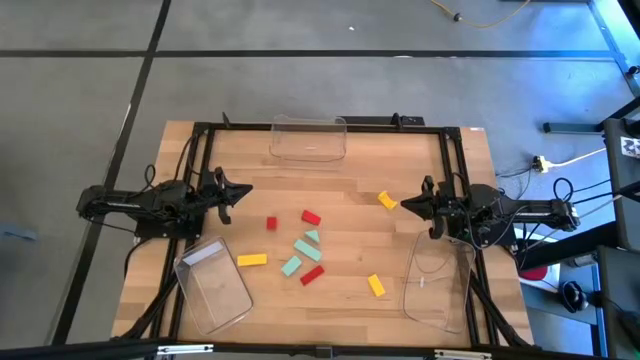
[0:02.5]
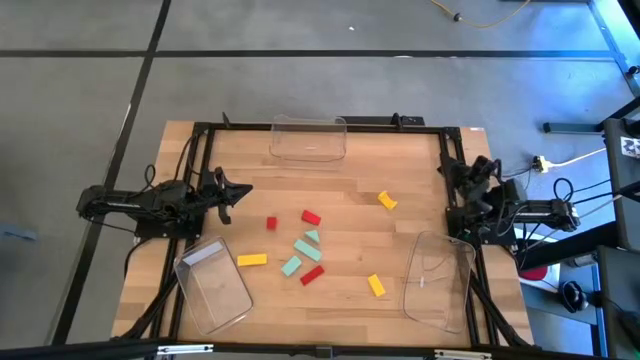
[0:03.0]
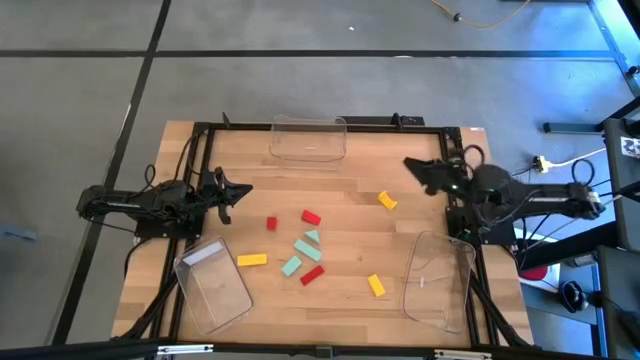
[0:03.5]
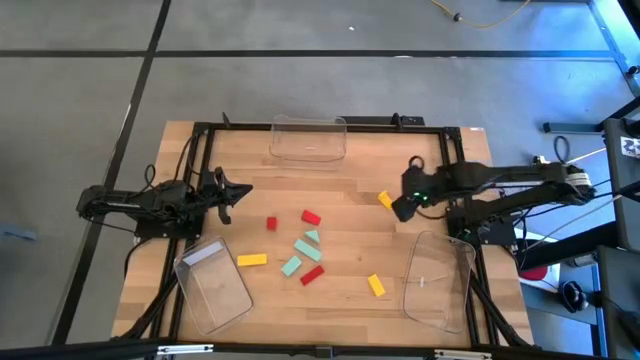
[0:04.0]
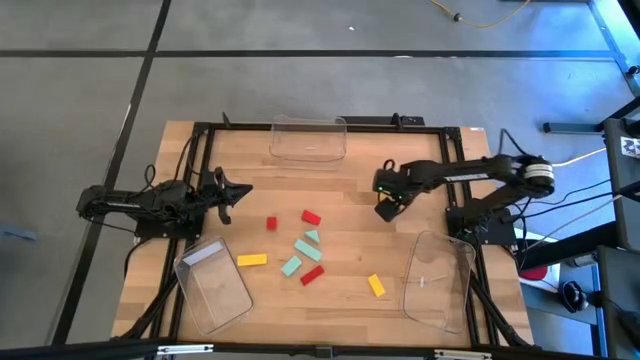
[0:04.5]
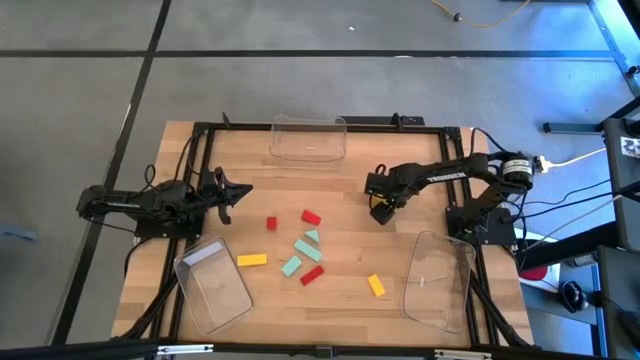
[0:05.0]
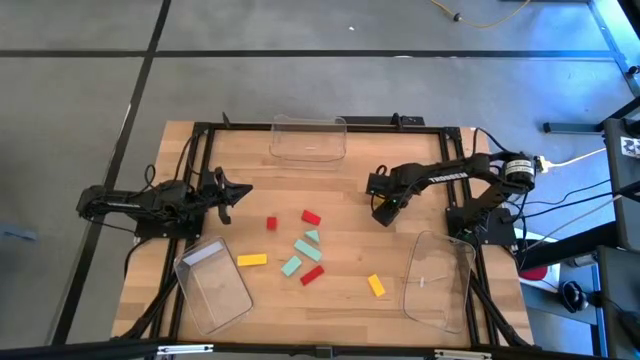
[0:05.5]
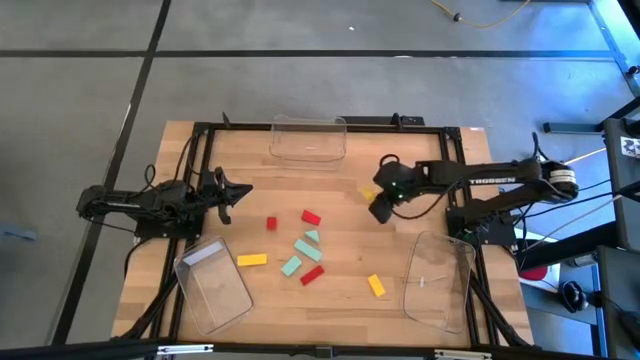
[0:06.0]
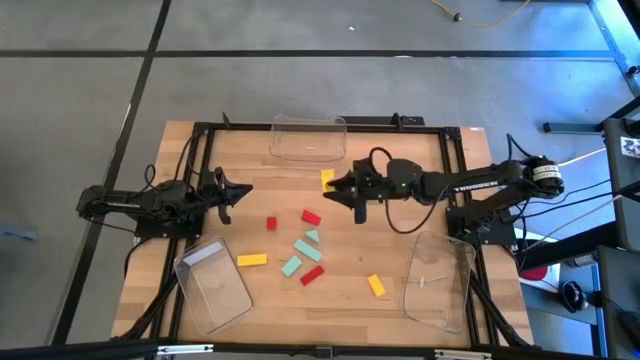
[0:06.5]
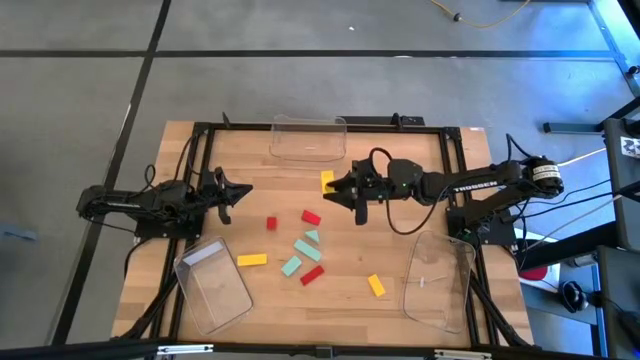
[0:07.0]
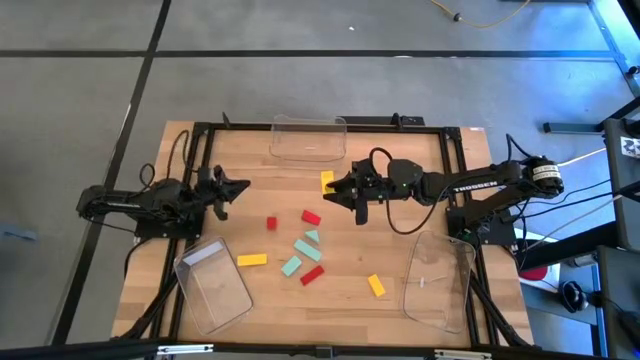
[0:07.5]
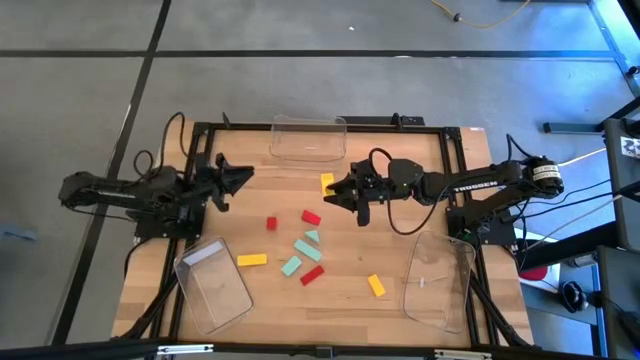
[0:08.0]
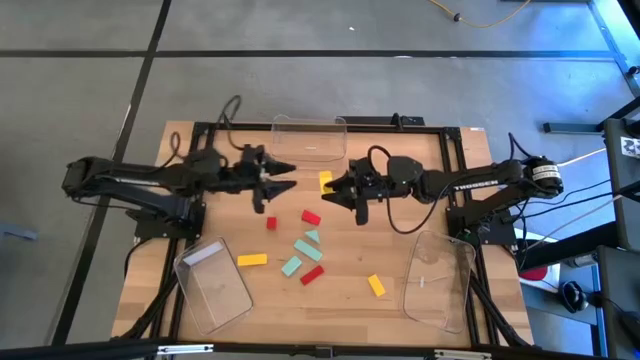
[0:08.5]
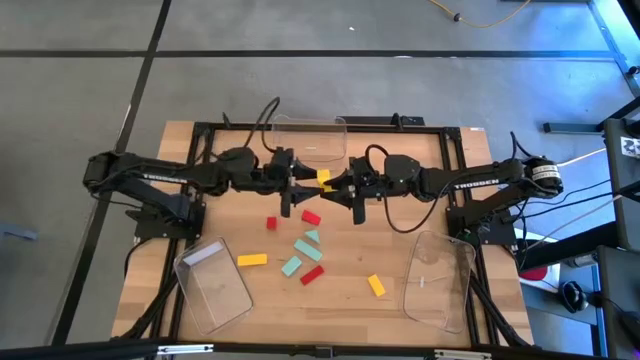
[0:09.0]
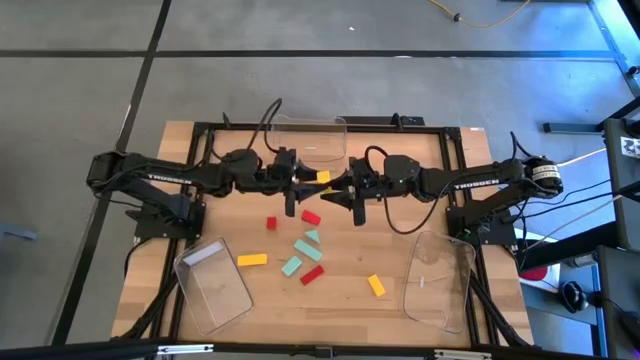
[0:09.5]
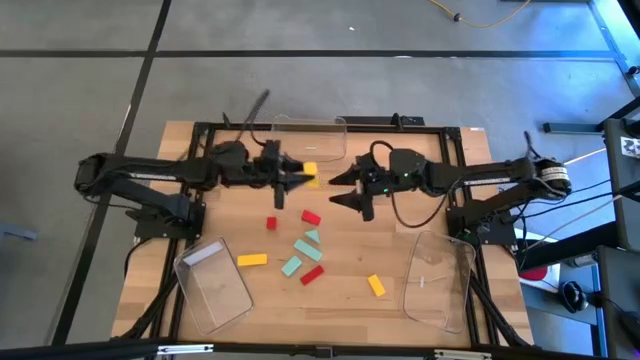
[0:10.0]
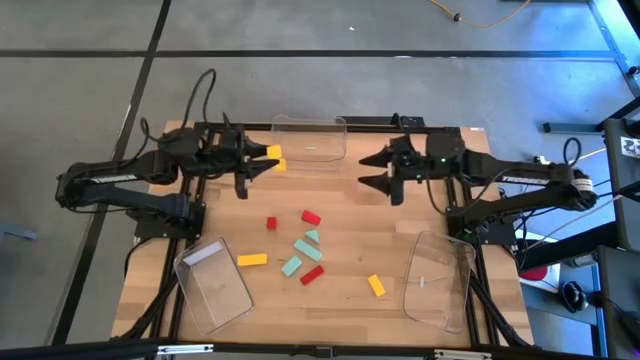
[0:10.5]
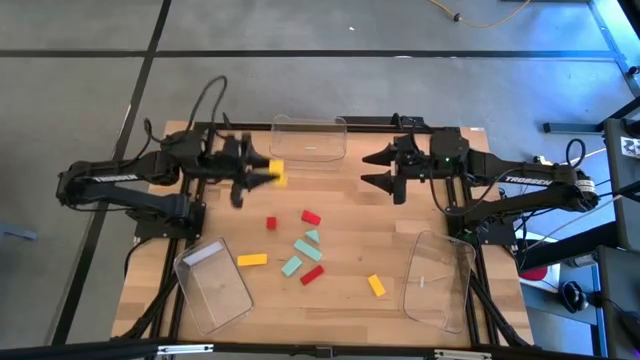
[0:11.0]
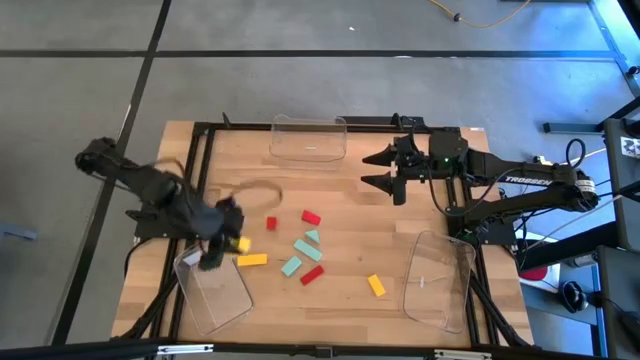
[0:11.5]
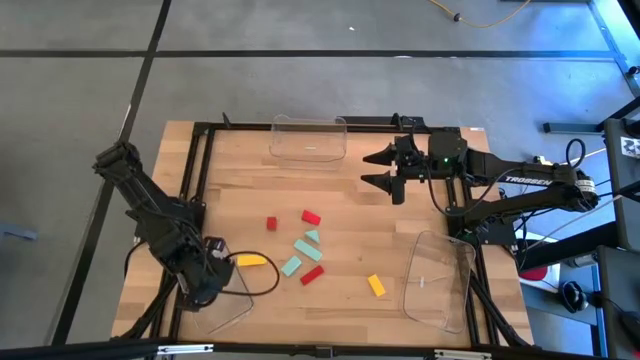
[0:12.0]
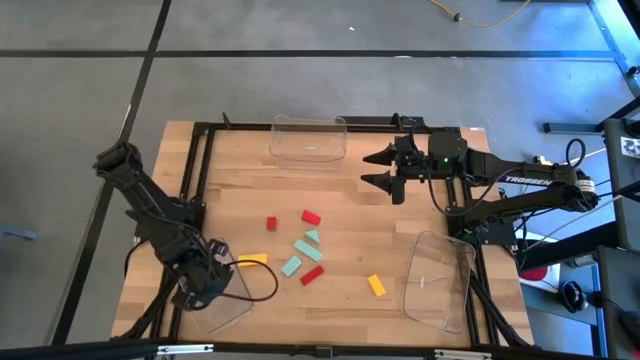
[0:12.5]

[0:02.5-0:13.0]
Task: Sort & place blocks by color
Put the top right yellow block into the left transparent bin

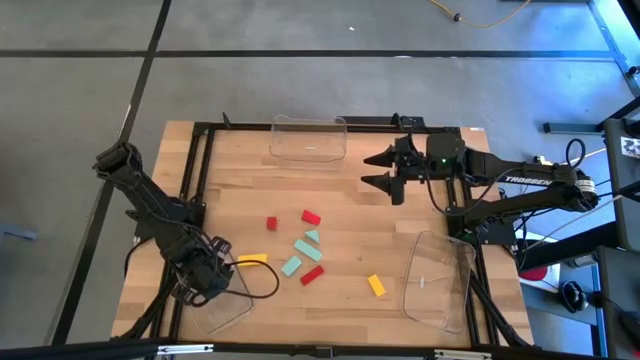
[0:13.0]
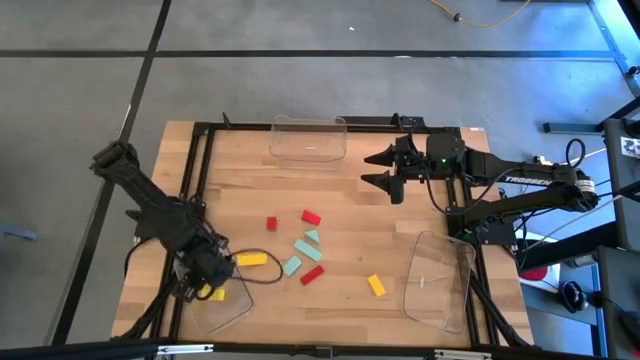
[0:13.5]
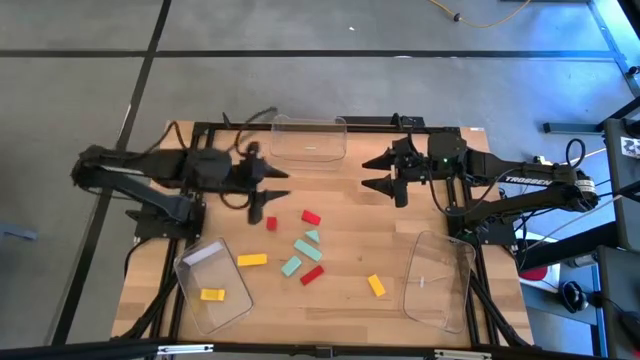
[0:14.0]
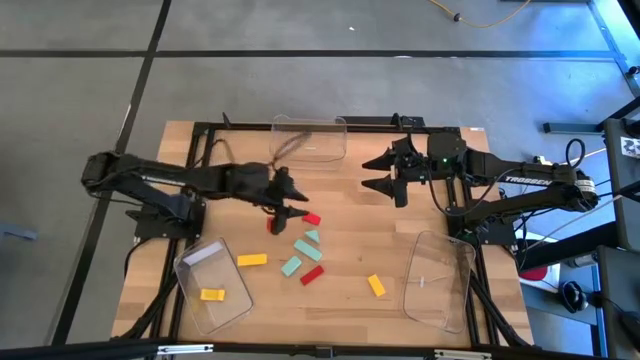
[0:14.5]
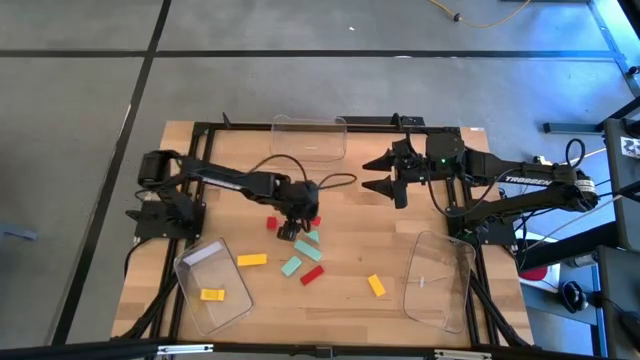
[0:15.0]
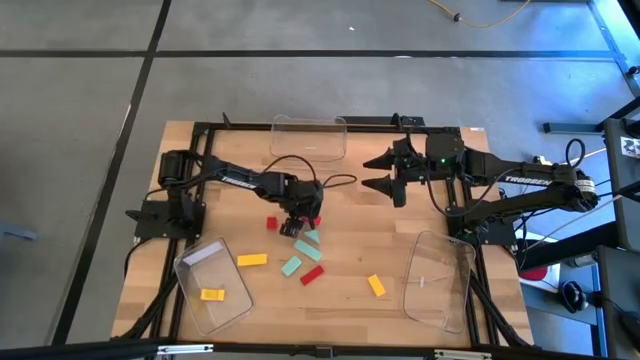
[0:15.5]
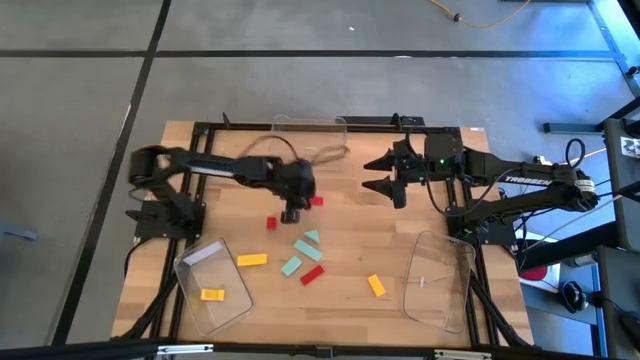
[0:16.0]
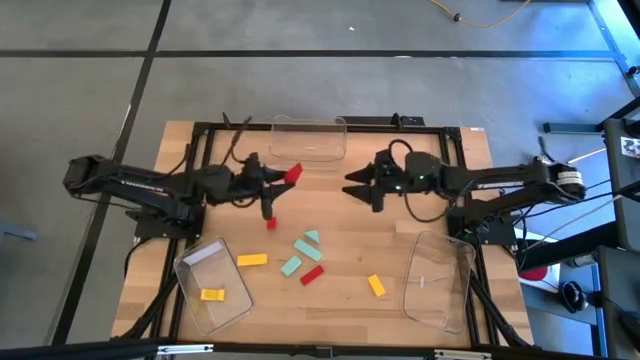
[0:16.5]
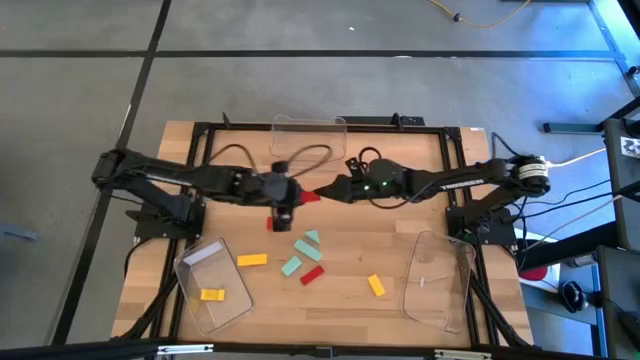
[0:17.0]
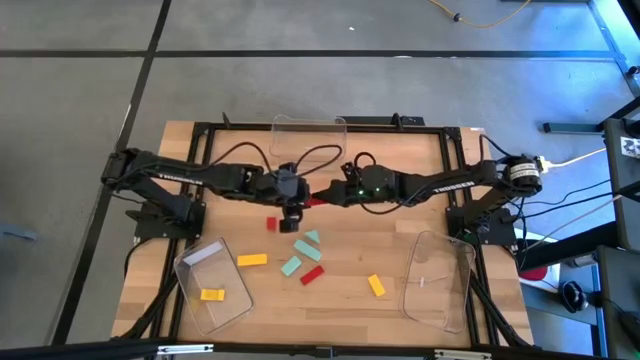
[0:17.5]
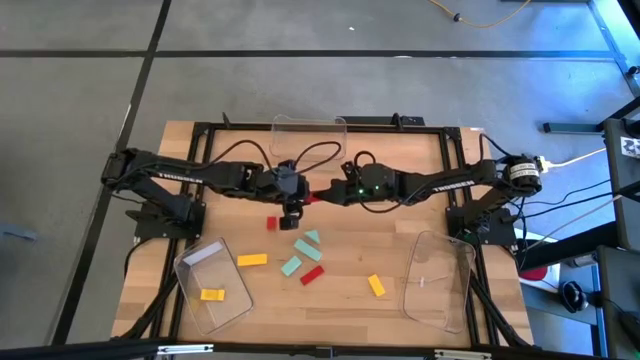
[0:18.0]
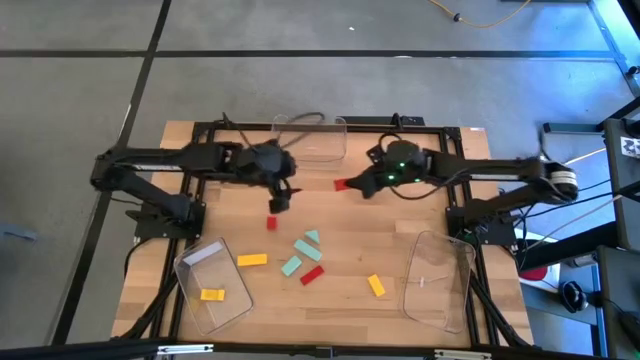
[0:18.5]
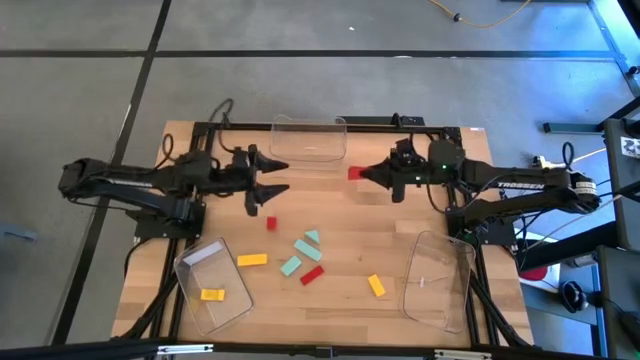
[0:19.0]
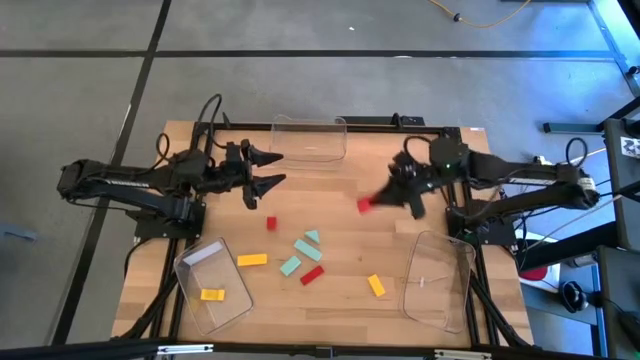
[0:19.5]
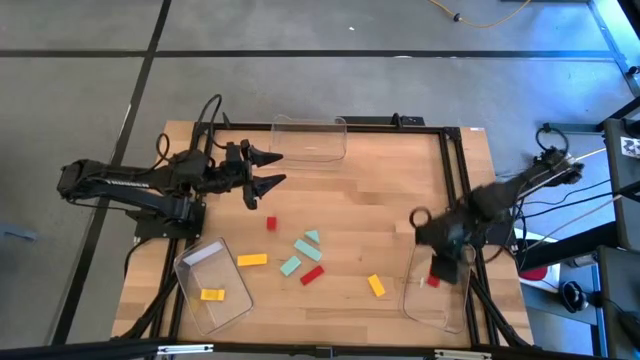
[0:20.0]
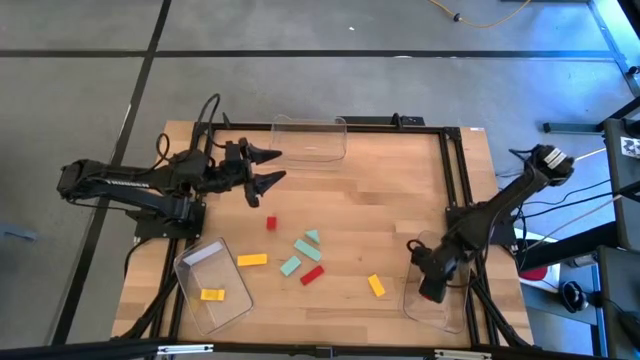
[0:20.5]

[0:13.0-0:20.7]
Put the top right red block into the right transparent bin

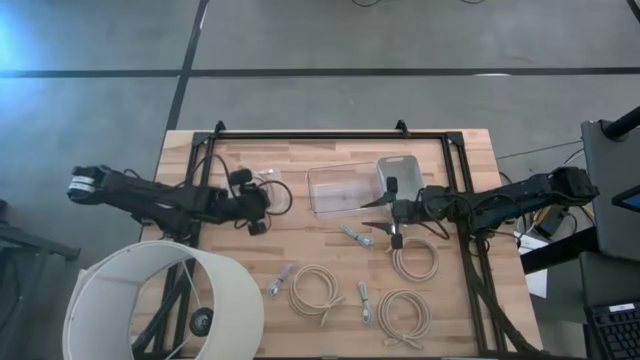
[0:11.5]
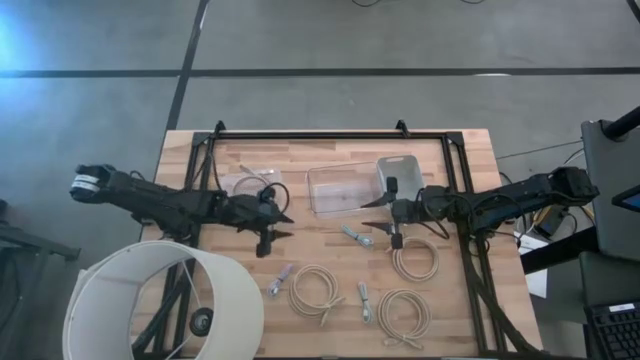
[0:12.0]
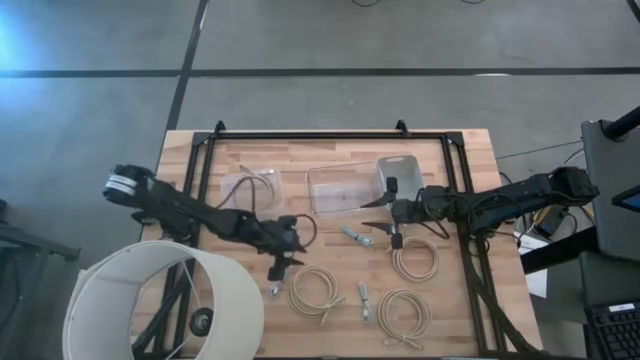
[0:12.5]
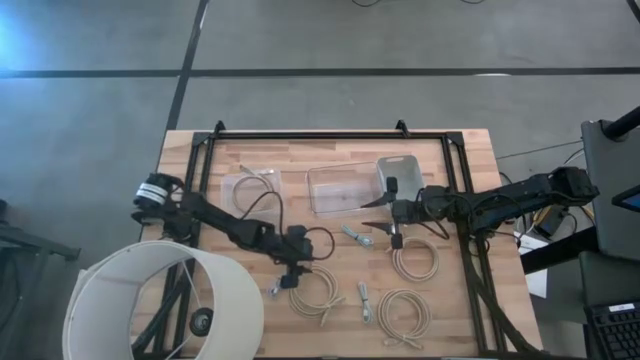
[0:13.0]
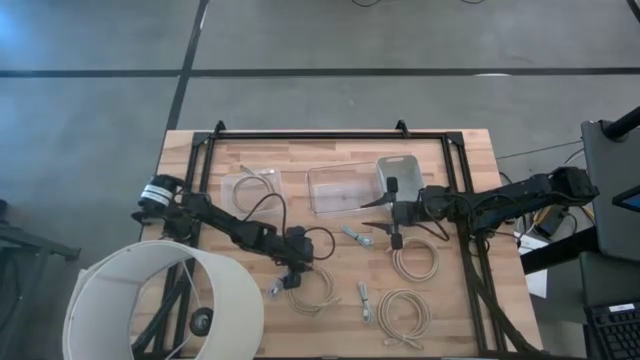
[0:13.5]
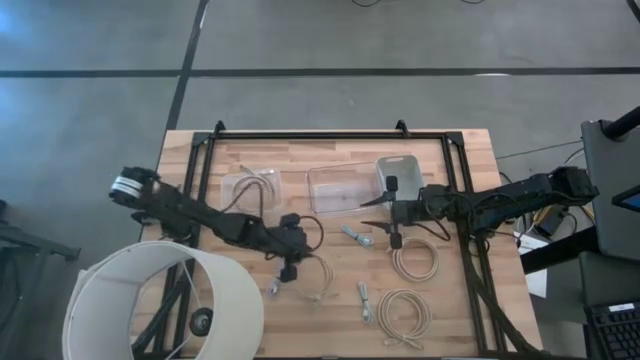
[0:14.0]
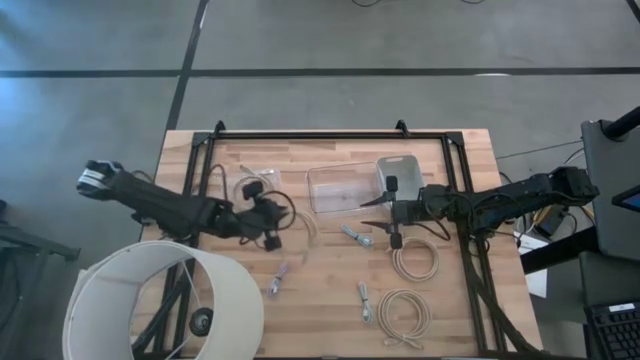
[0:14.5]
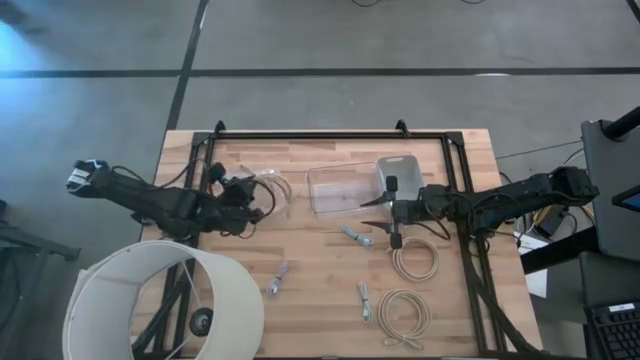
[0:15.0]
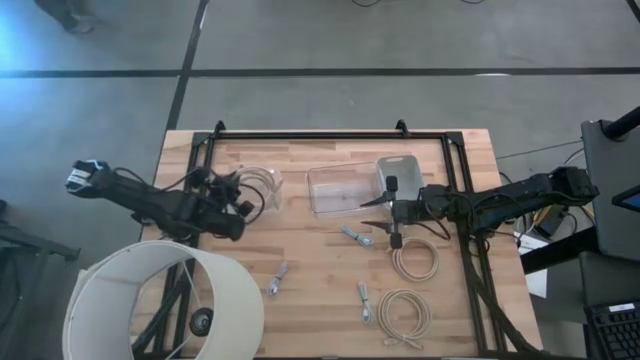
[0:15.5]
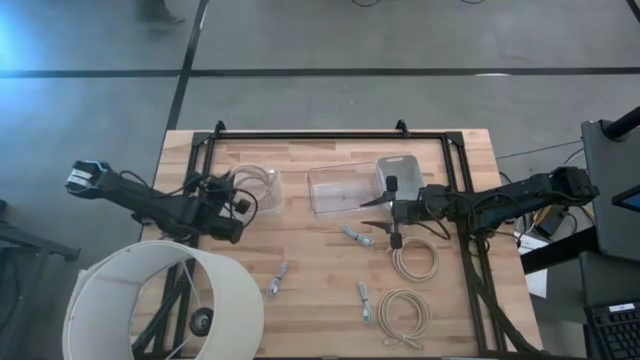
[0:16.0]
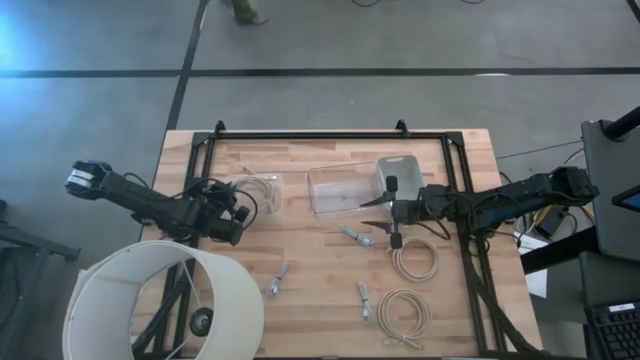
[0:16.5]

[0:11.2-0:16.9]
Task: Pick & Place USB Port
Put the left brown charger cable into the left transparent bin
